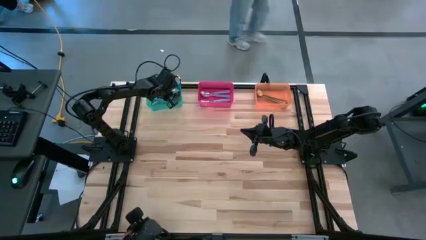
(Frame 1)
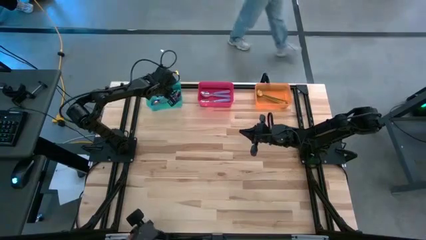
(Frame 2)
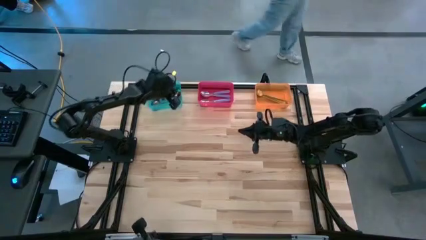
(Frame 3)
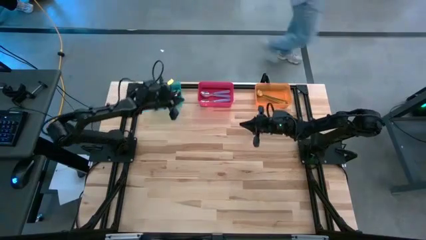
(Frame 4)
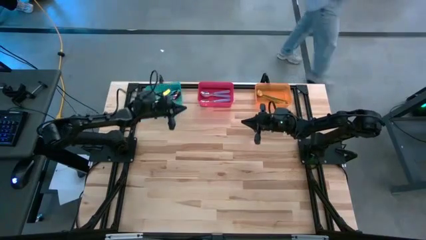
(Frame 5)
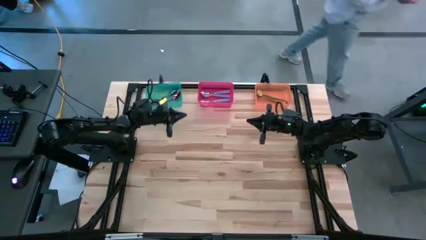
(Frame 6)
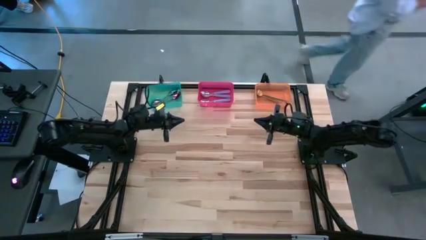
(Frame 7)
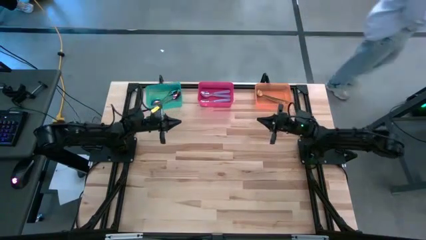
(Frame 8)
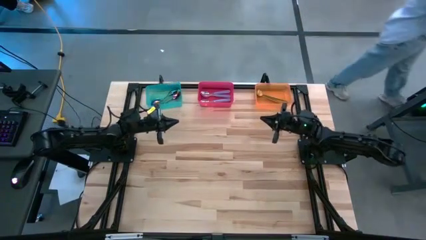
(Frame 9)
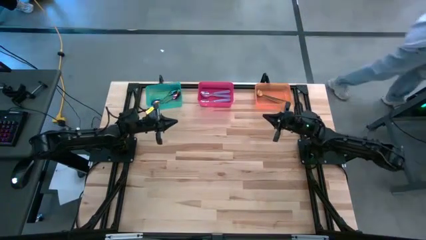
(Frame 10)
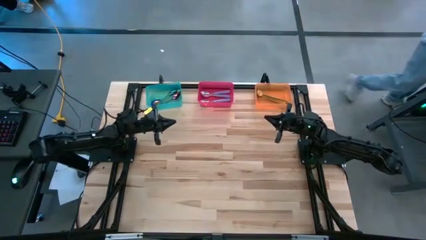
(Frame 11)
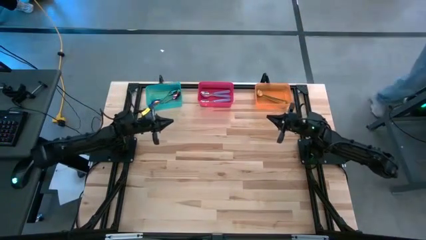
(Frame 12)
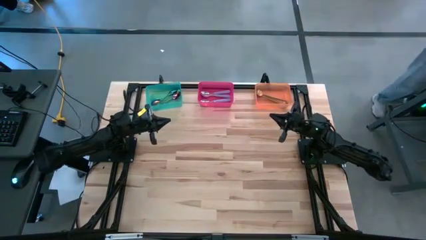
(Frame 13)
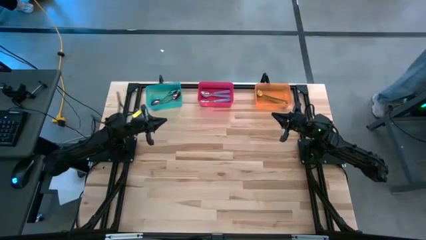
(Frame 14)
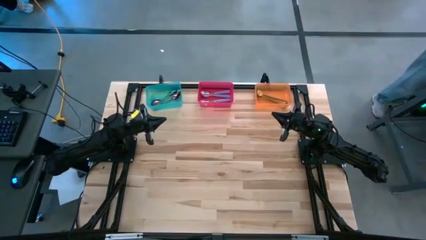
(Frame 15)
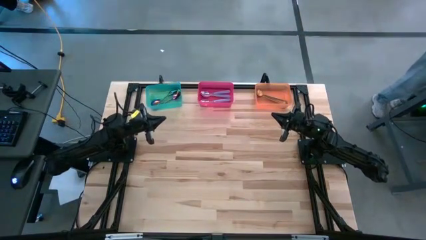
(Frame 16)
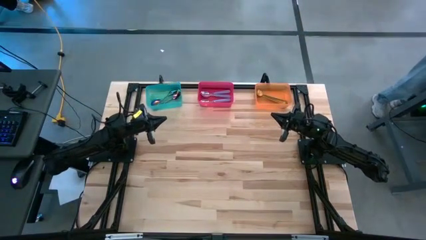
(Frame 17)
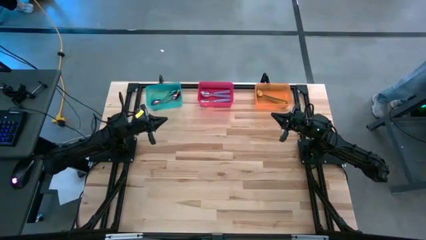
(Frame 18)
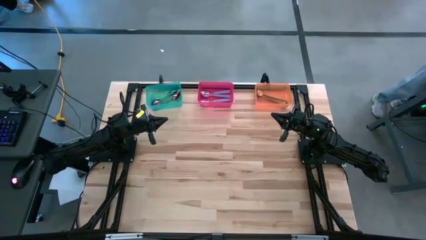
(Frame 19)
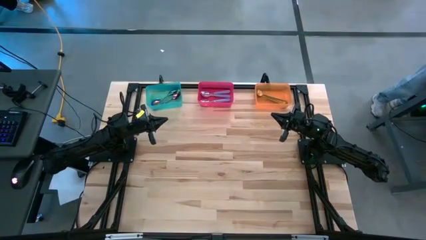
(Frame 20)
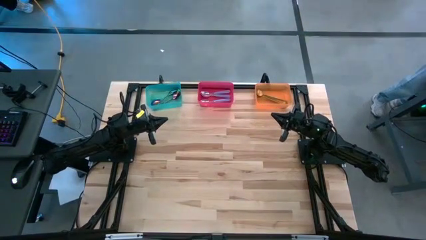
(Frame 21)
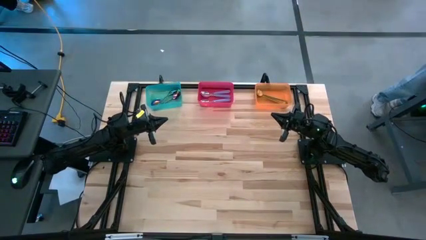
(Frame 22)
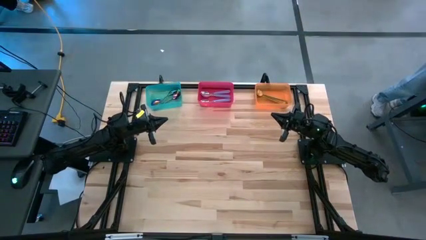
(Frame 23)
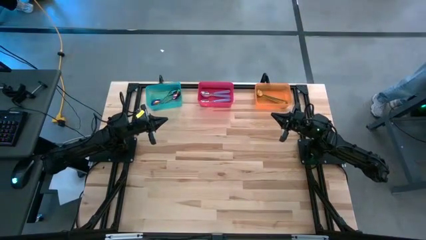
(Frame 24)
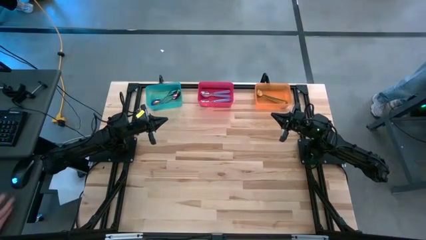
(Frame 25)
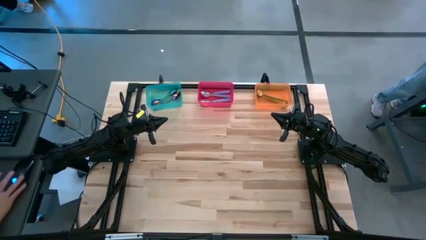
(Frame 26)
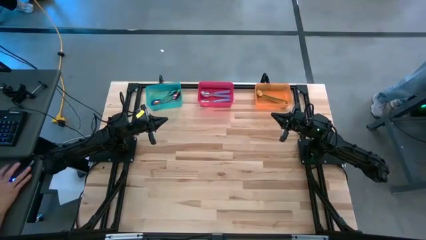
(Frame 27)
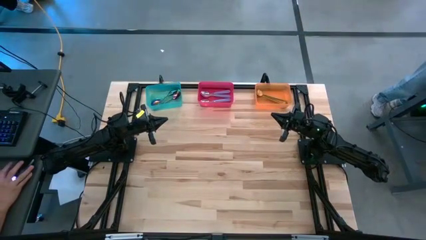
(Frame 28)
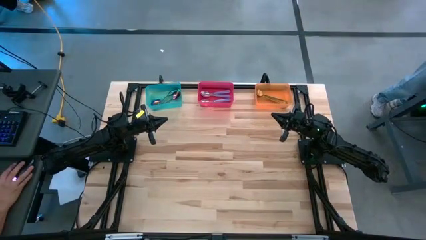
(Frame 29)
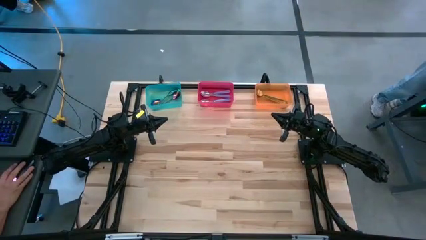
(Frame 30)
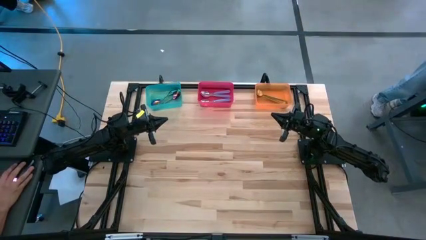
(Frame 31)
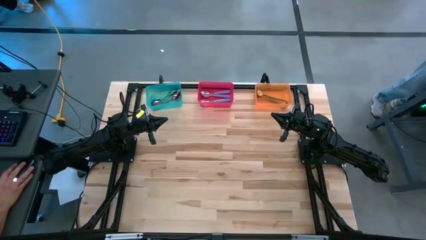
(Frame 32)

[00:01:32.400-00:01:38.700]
Task: Sort silverware by color (type)
Return to Home Position

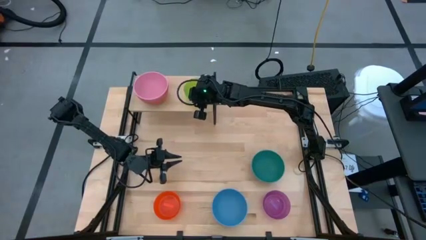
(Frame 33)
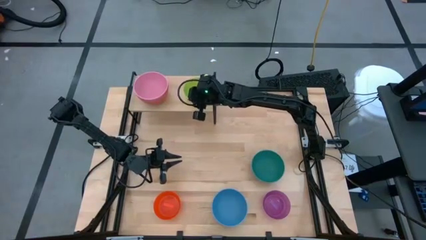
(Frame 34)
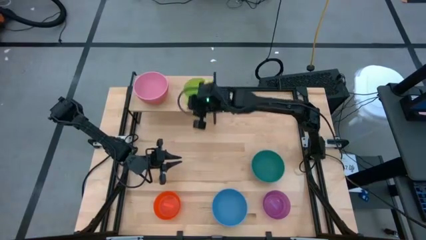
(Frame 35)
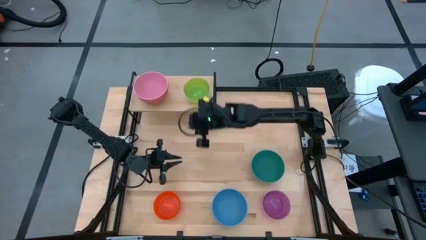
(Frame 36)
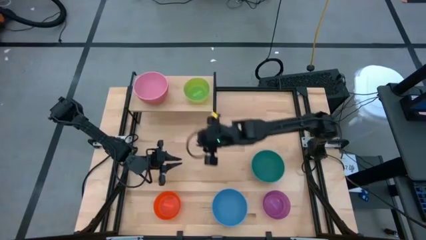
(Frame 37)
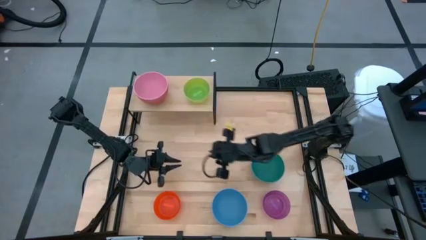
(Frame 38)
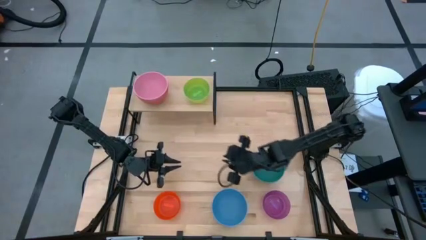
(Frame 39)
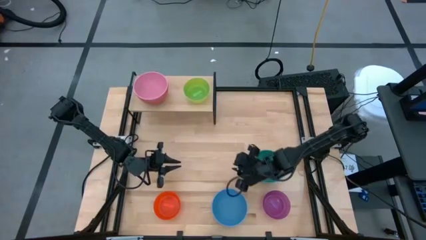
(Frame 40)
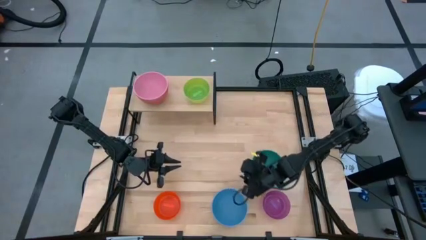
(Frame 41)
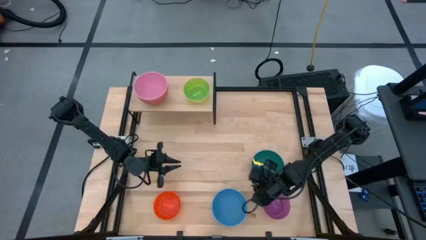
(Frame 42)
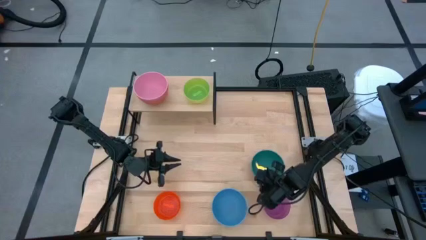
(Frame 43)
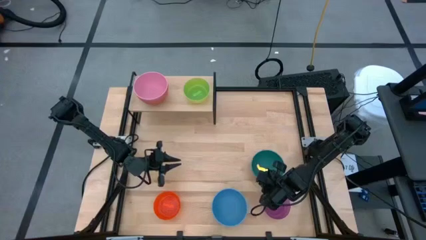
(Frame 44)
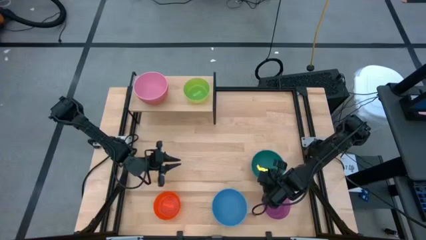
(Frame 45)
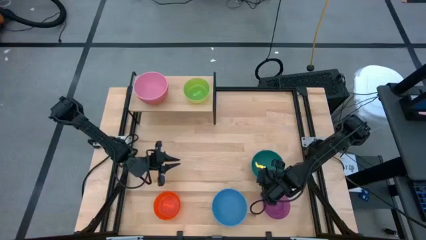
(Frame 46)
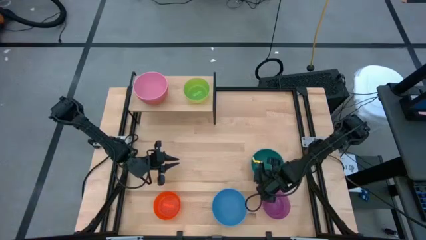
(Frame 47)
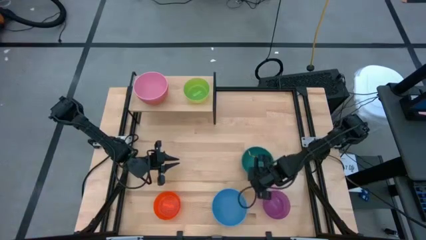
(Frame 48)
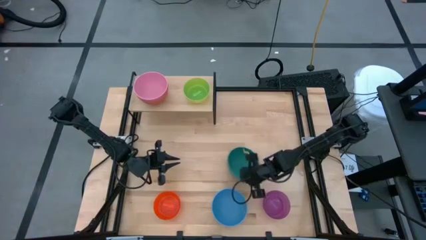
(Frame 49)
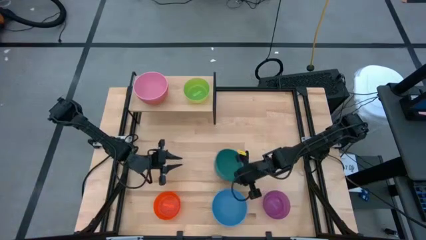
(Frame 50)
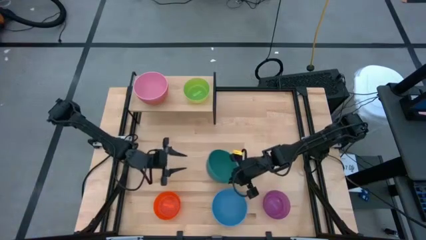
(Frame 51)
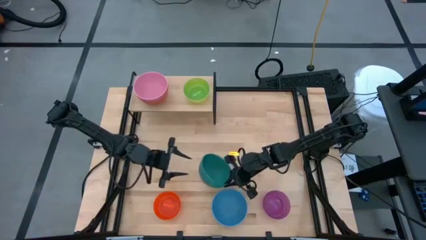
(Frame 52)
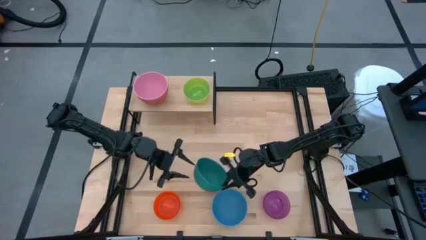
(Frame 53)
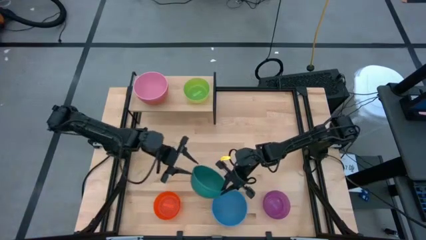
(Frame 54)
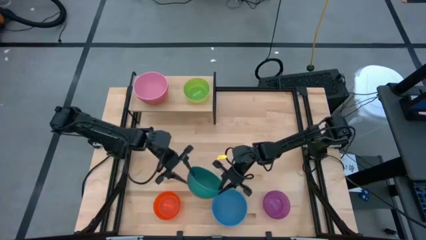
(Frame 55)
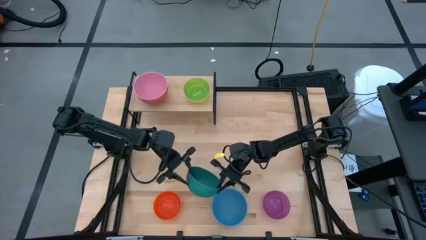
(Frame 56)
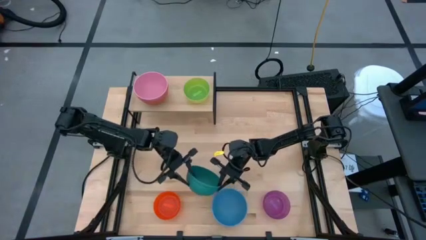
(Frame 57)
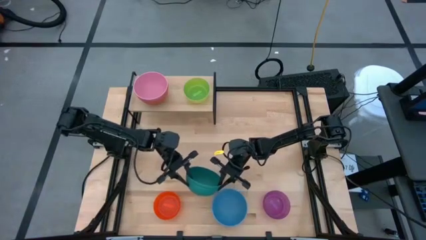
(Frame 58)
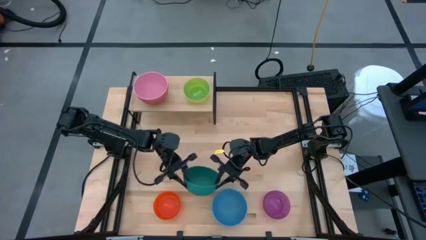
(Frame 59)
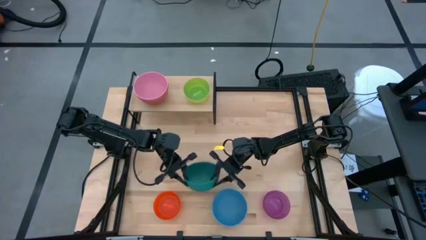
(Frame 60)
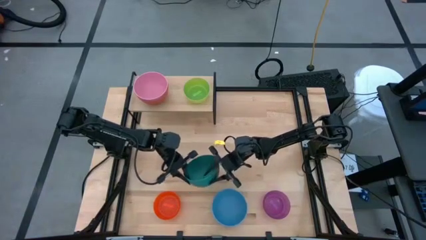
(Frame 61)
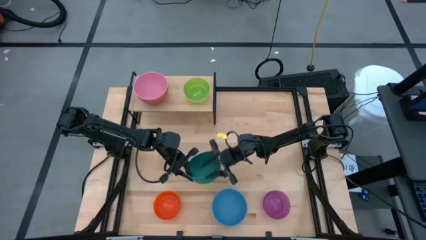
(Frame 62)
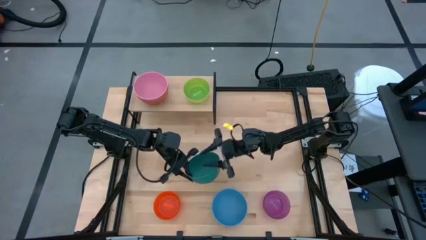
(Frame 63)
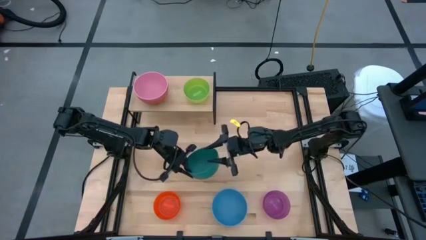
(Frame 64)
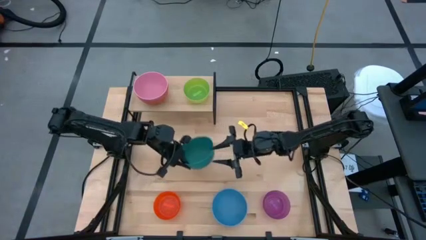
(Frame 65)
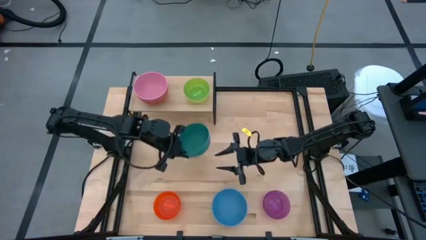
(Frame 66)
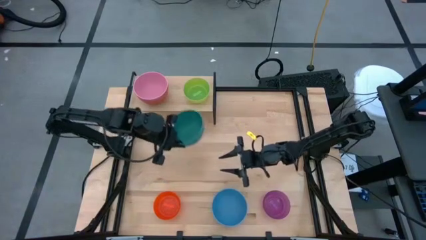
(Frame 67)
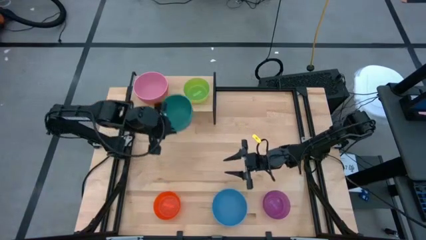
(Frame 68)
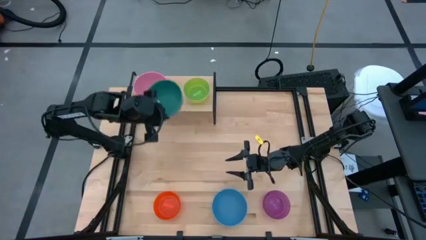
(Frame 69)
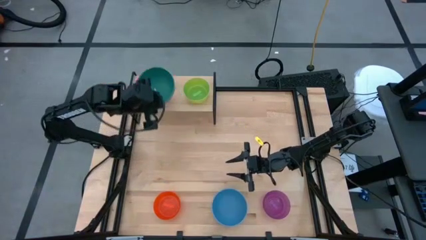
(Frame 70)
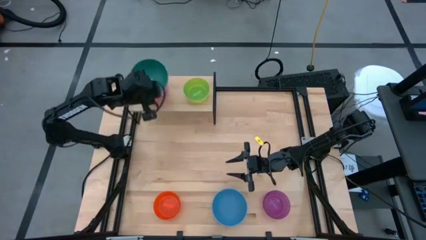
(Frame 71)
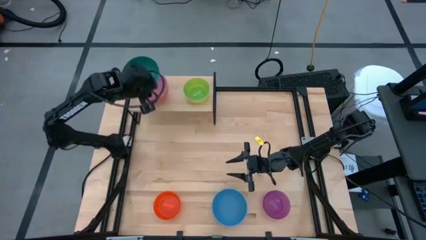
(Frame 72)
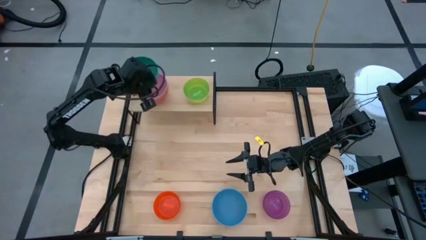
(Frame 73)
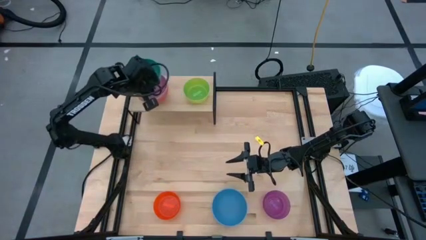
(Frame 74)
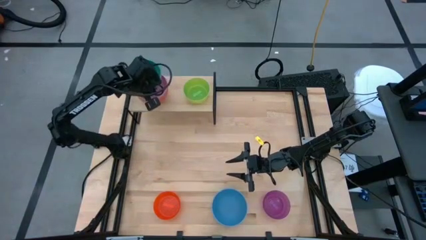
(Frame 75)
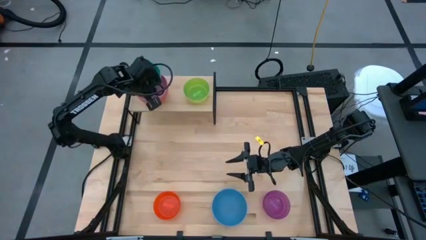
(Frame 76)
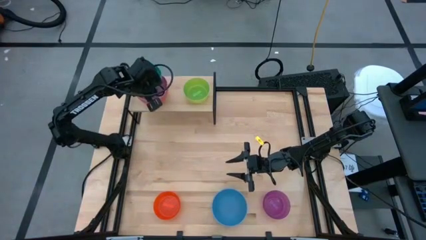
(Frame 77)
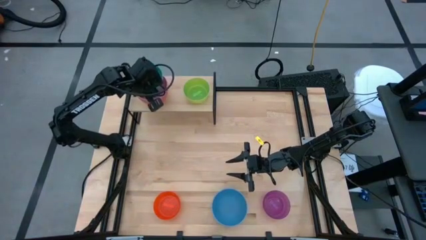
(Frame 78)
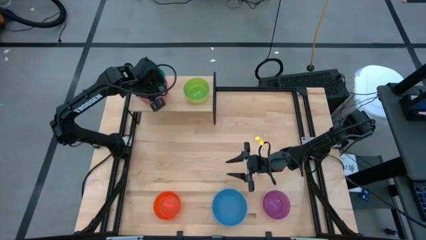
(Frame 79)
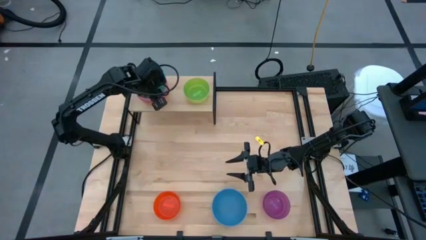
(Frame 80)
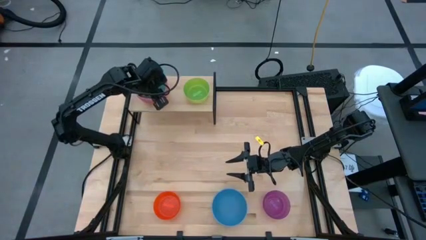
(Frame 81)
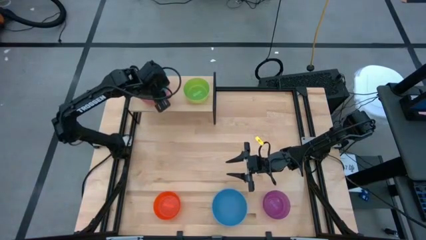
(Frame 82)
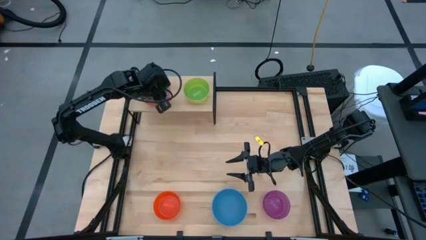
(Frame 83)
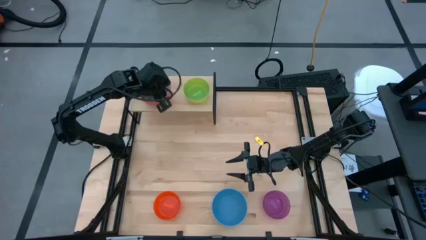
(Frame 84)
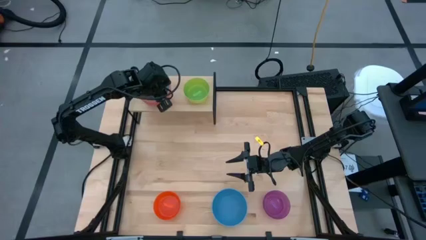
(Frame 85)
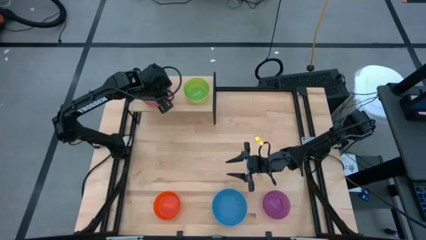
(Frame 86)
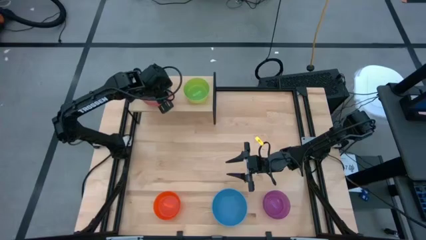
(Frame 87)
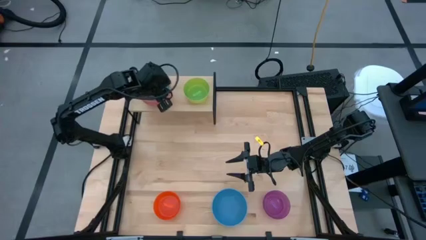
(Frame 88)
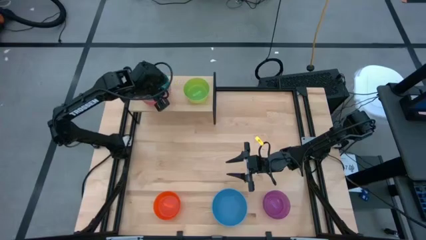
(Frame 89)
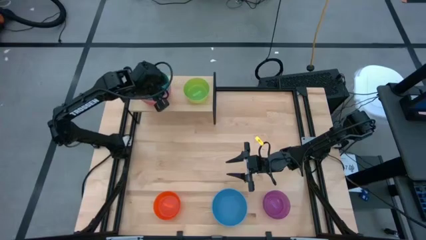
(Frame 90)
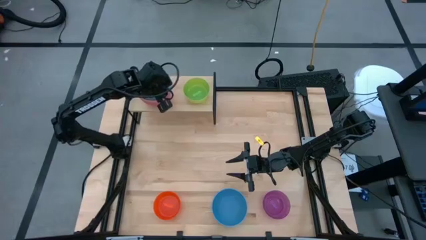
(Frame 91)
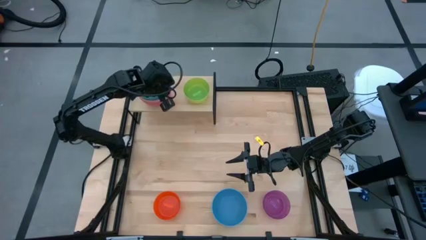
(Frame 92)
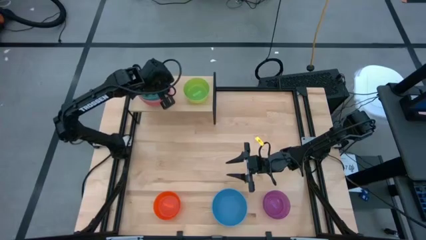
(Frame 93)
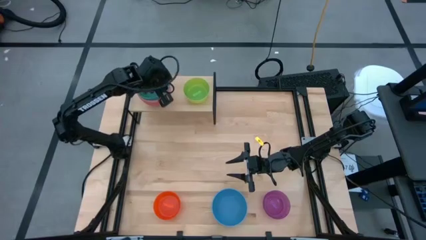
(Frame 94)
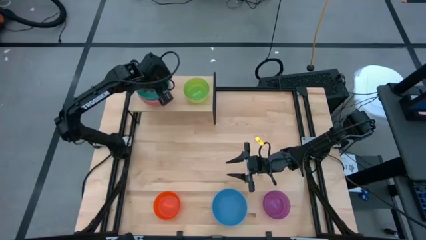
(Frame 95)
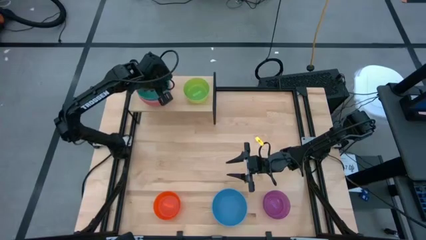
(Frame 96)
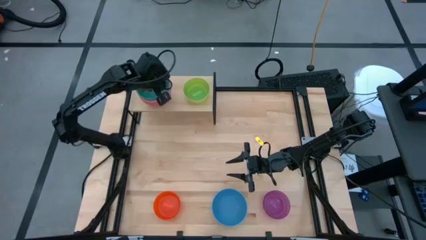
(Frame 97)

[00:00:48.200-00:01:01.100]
Task: Place and stack bowls onto a shelf
Stack the blue green bowl into the pink bowl on the shelf
